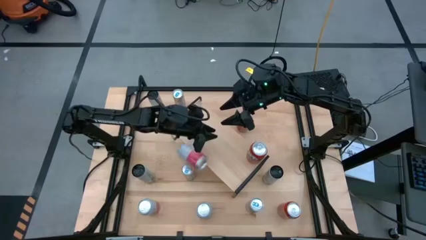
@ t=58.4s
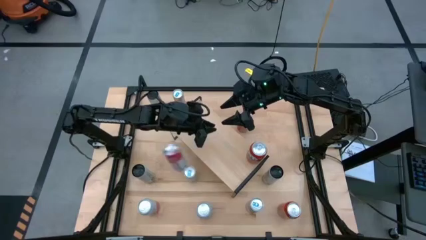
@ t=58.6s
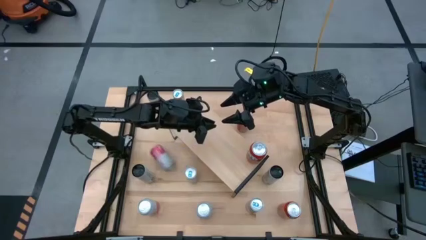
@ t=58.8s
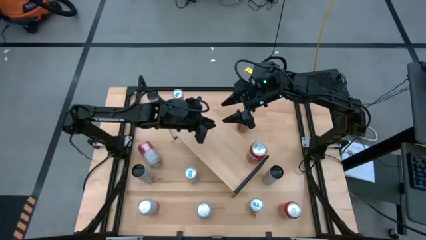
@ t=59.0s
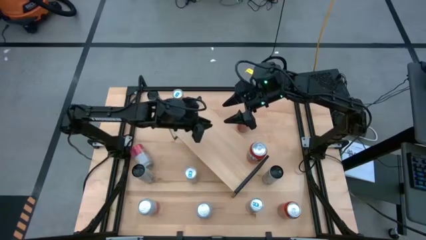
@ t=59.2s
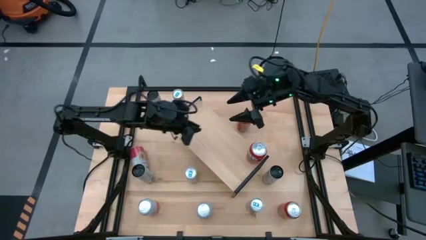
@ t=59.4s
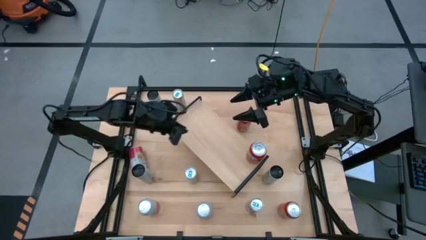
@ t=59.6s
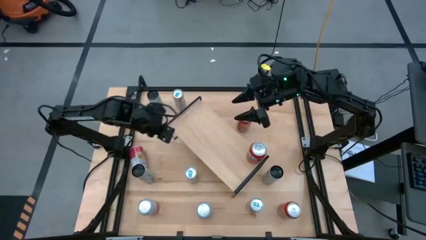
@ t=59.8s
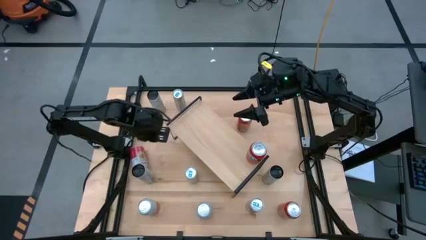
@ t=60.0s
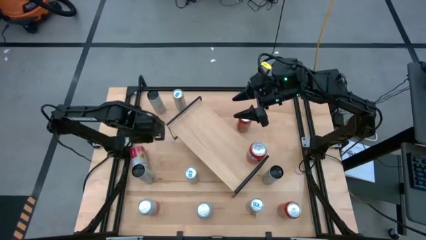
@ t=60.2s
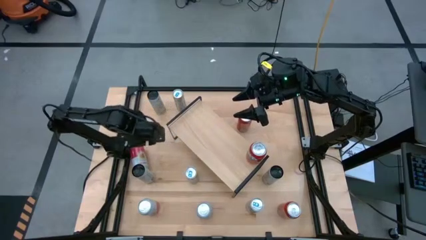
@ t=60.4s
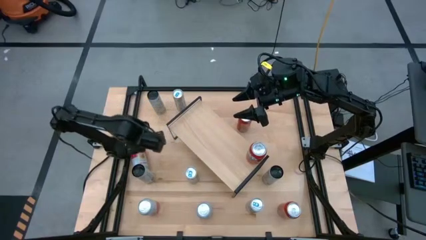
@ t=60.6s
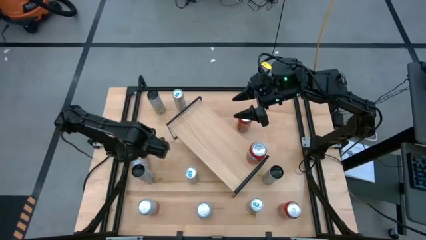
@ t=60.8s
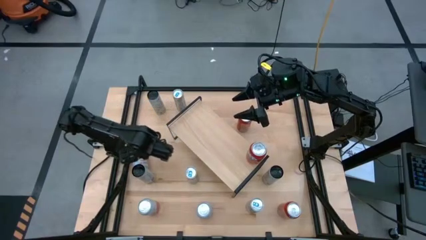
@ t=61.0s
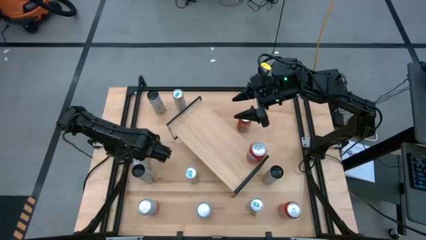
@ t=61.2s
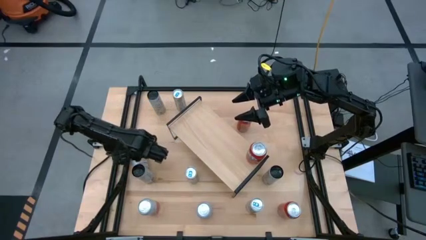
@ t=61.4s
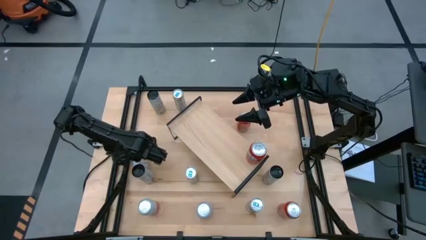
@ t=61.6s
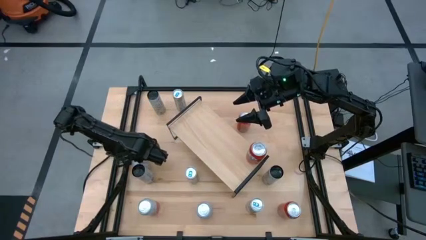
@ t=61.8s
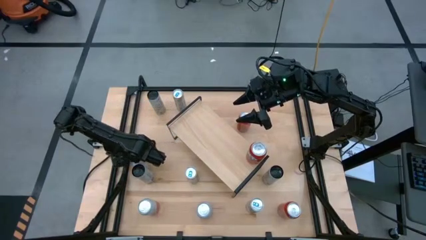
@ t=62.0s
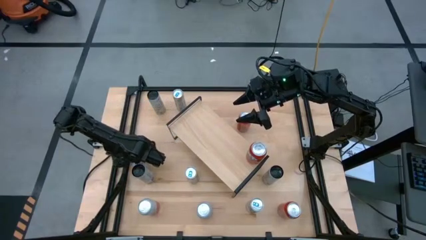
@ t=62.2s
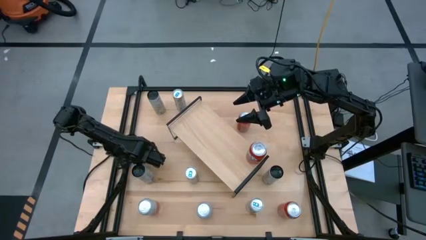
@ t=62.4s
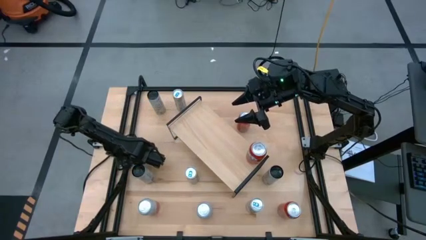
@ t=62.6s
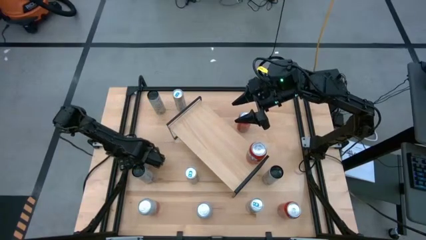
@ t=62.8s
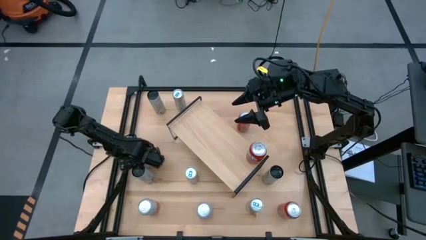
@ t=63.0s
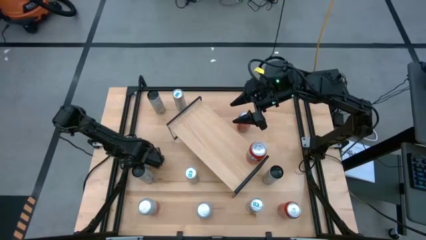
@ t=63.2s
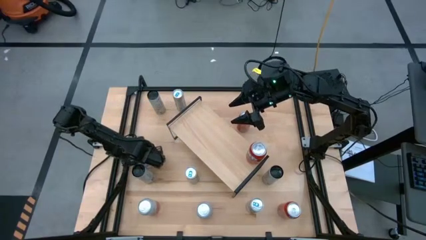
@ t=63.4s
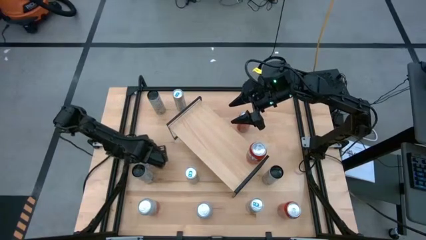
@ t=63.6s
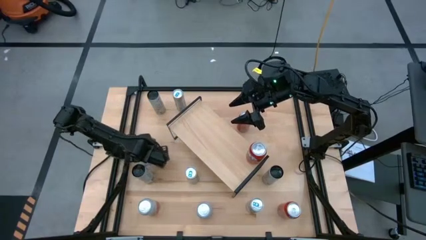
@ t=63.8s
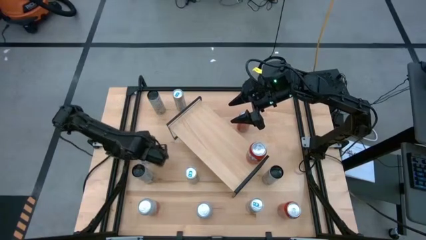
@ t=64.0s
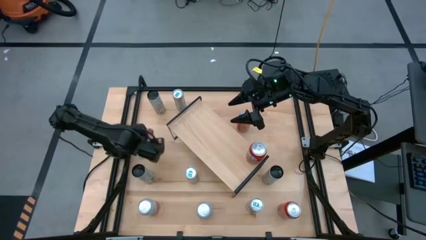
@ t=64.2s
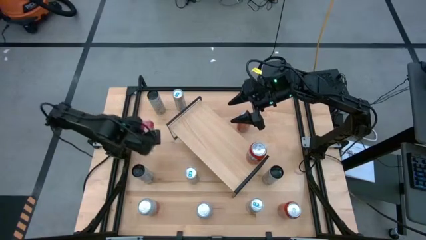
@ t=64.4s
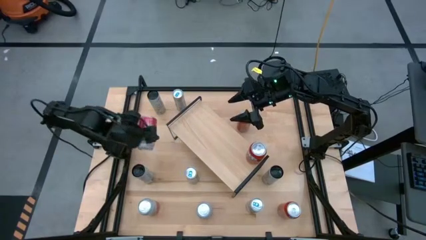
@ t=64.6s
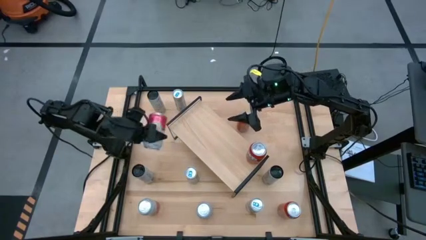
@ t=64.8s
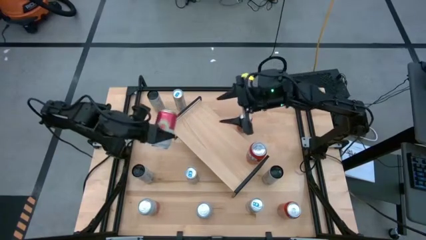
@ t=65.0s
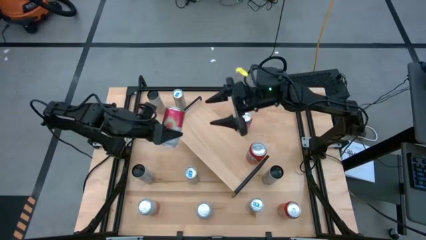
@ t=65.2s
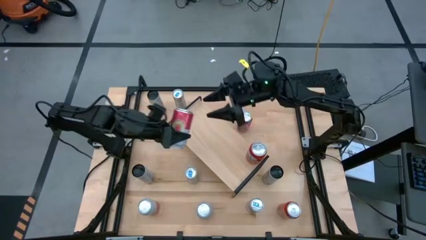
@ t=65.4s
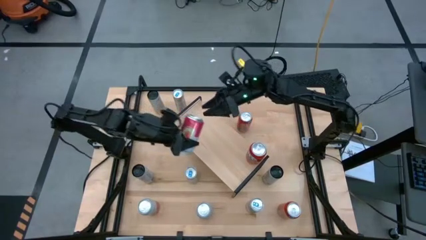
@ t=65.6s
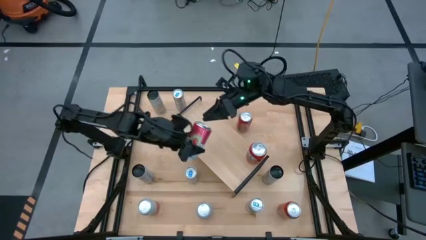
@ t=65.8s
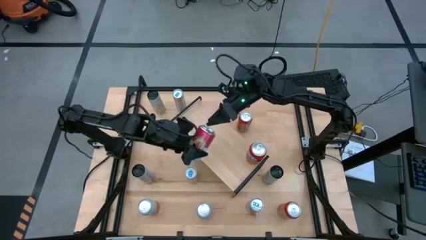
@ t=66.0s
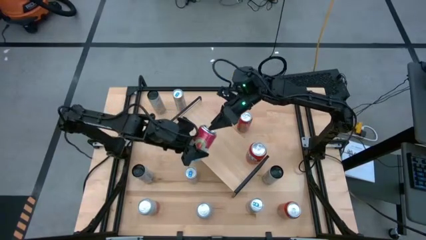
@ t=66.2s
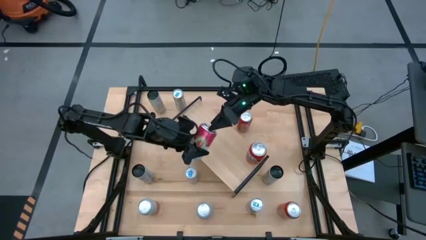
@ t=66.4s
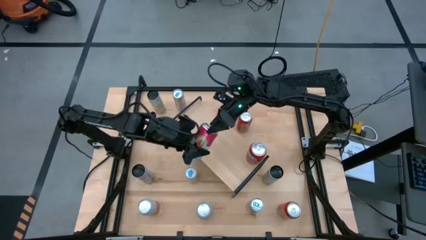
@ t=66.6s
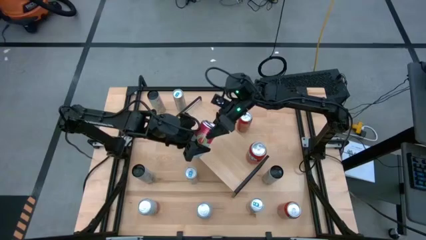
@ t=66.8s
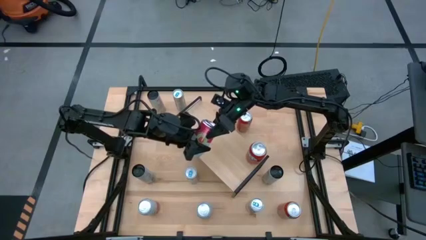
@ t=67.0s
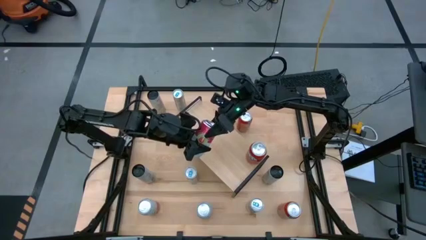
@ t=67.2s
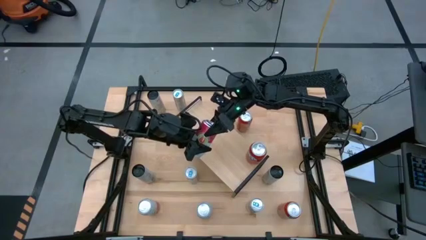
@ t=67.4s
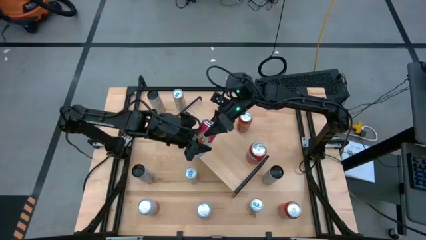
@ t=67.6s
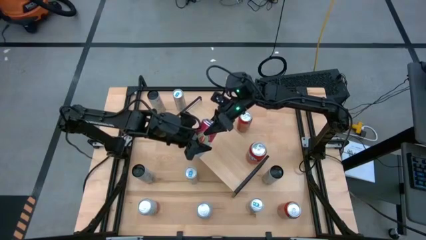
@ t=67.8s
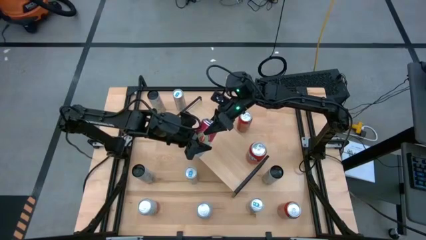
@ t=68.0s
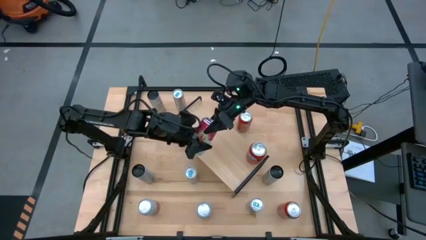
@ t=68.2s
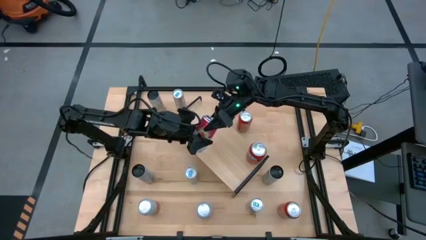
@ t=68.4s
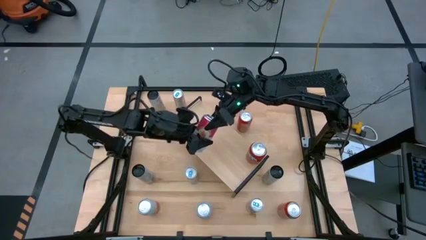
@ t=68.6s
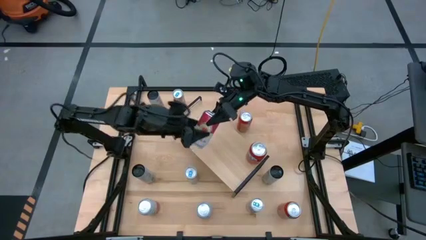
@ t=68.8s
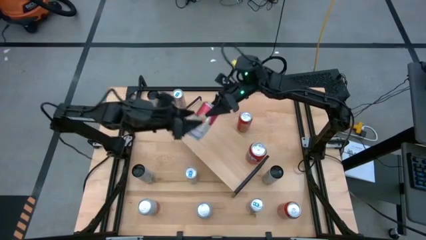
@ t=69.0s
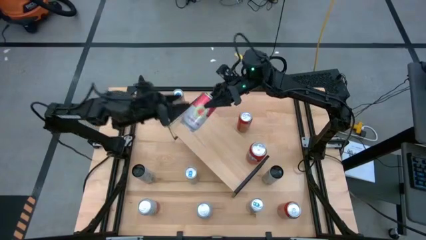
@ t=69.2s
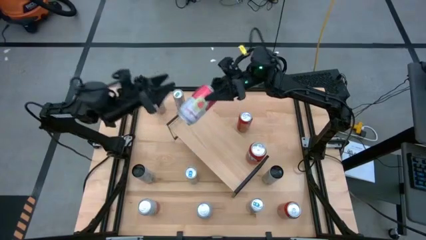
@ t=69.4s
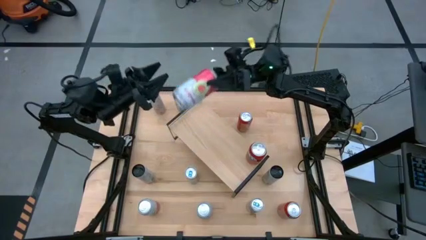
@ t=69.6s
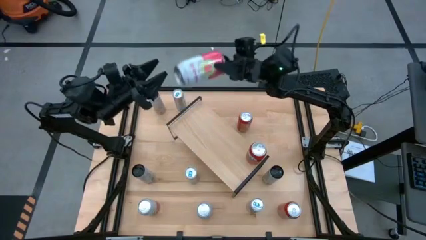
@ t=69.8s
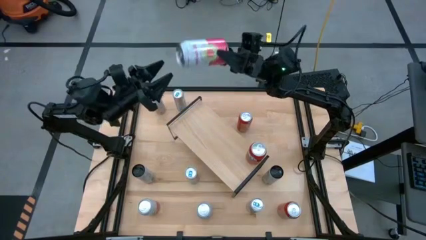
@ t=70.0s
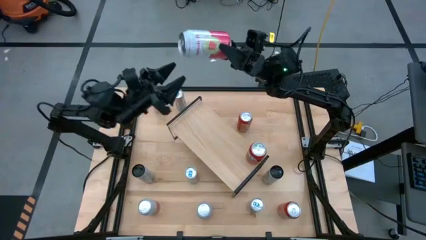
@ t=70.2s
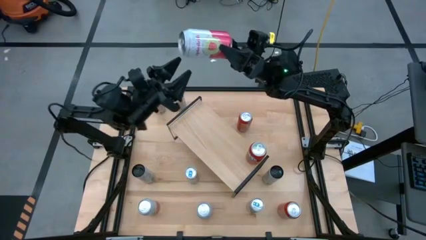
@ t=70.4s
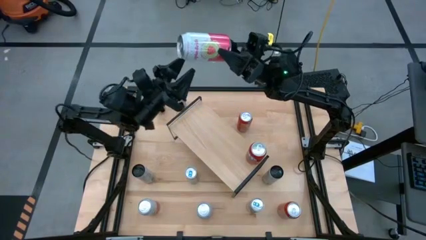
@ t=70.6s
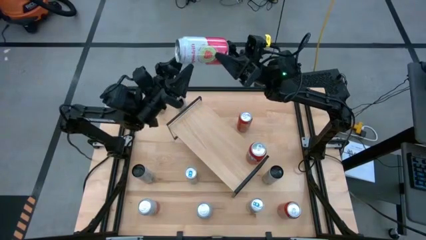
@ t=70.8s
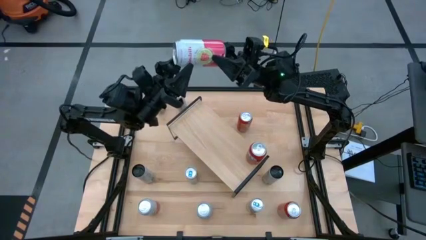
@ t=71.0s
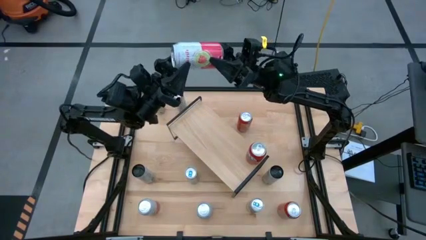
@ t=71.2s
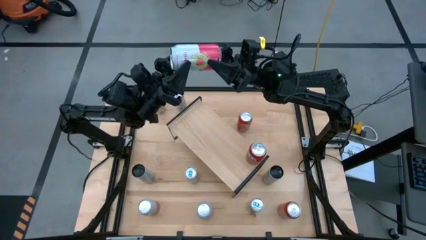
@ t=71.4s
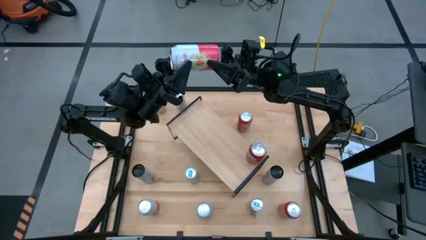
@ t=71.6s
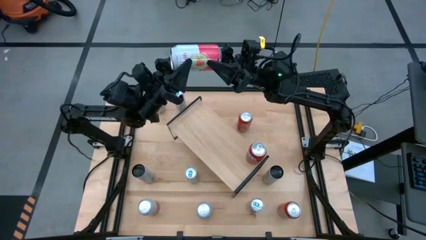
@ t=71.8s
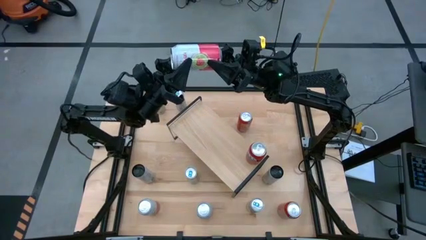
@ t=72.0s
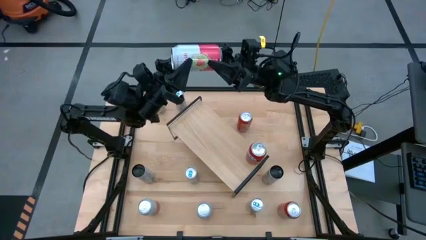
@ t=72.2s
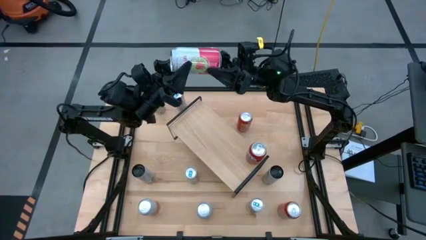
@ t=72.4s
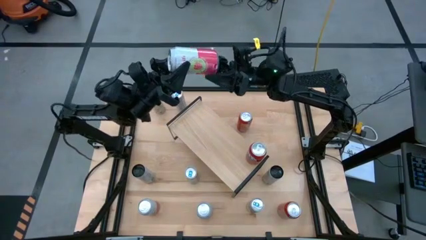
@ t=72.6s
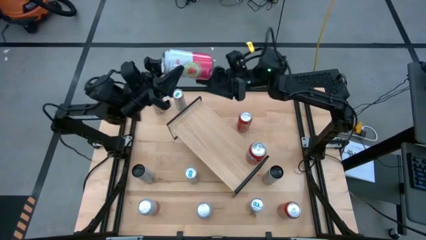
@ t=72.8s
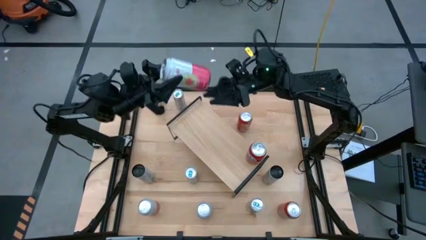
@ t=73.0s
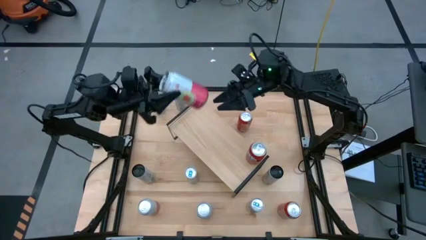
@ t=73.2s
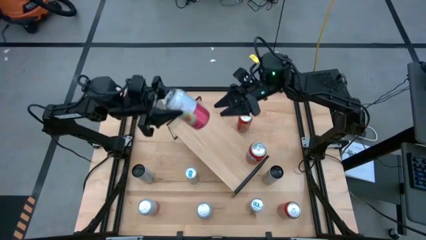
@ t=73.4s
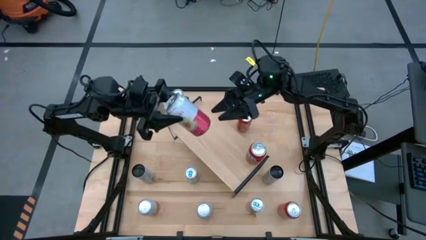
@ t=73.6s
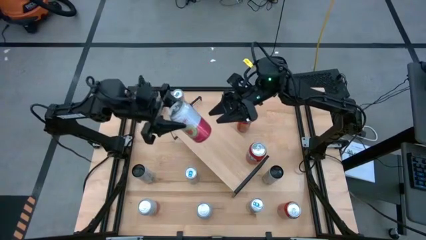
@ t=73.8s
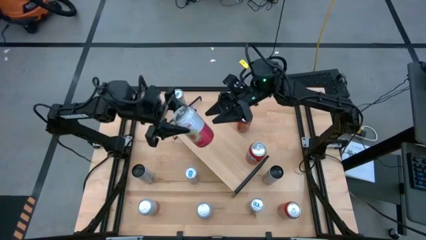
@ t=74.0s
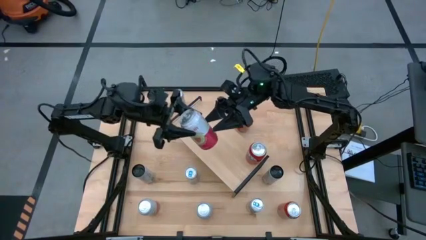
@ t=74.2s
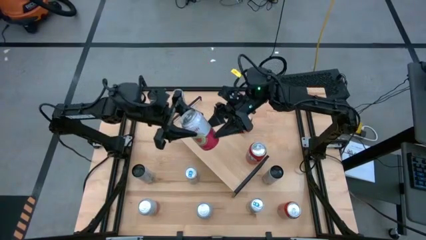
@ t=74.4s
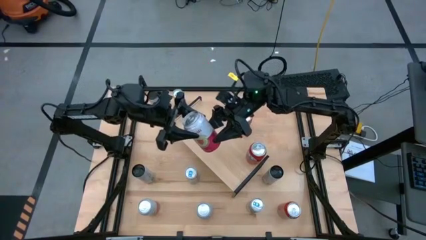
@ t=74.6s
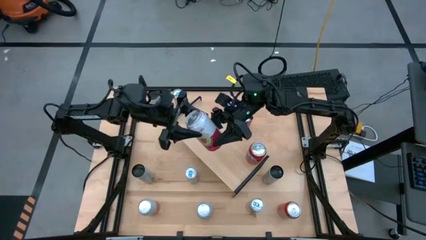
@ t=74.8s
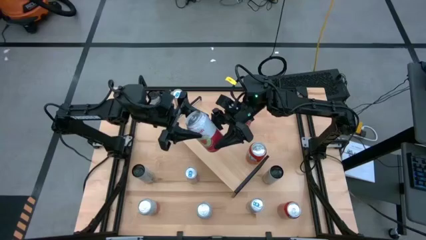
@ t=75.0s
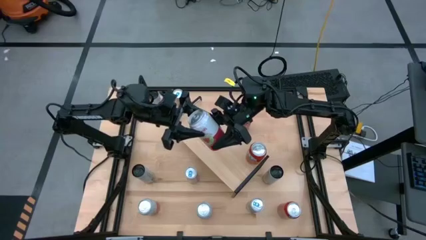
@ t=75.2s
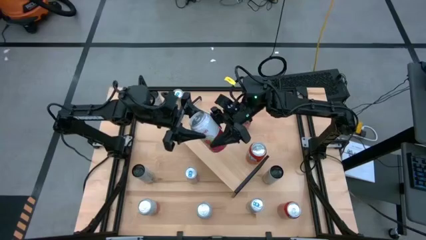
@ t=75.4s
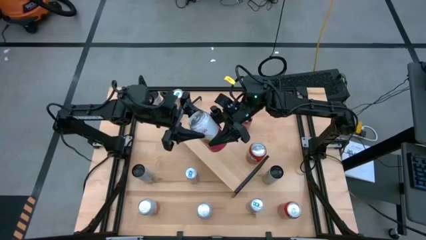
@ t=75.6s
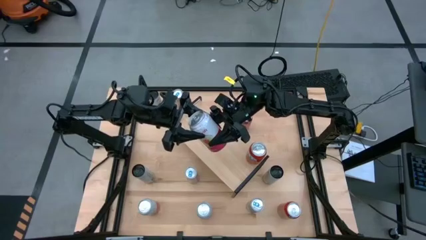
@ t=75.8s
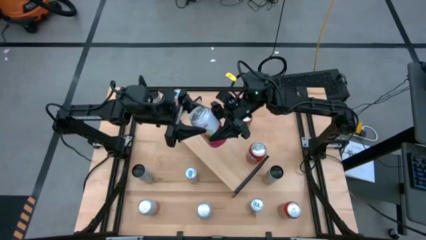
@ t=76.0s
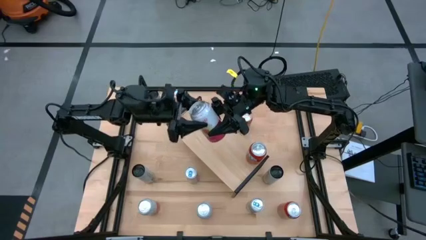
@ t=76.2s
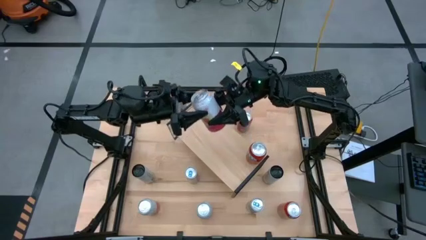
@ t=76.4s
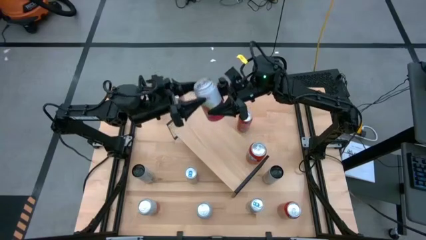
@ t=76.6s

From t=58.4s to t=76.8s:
Task: Place canned beverage on shelf
Put the top pink white soda can on the shelf
